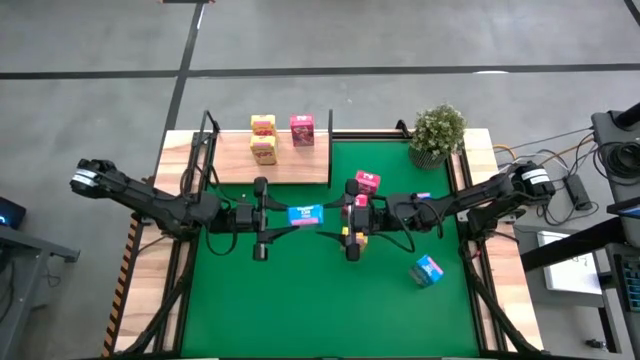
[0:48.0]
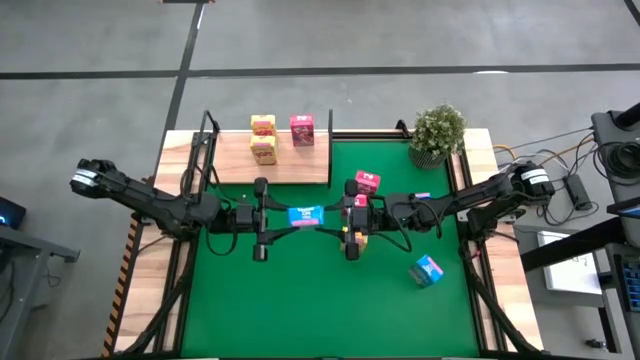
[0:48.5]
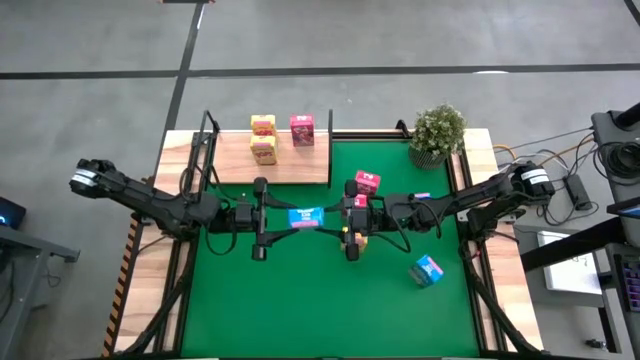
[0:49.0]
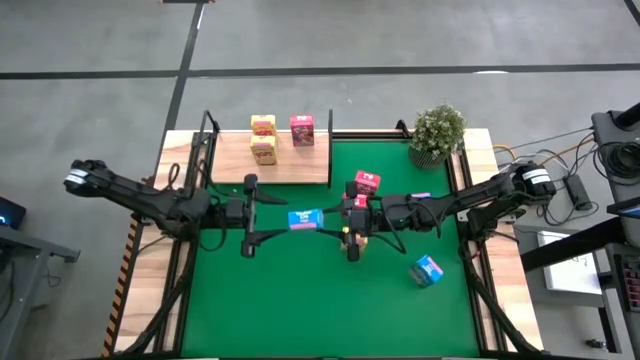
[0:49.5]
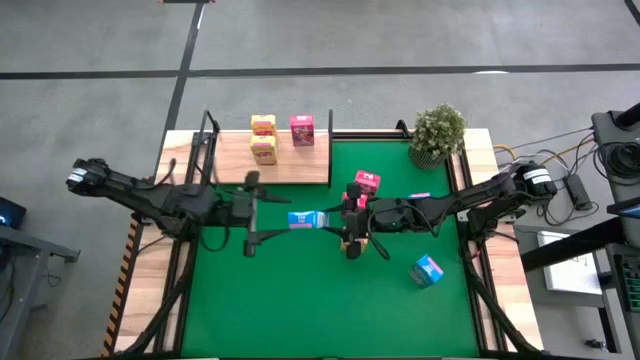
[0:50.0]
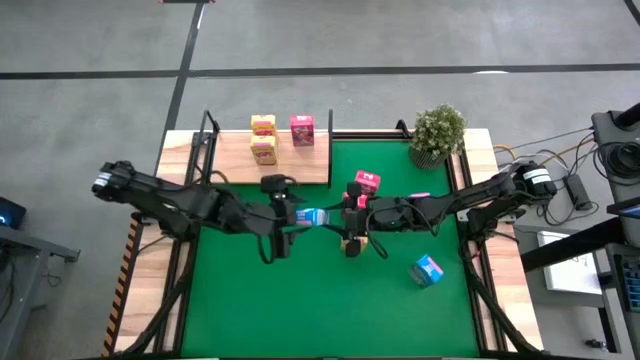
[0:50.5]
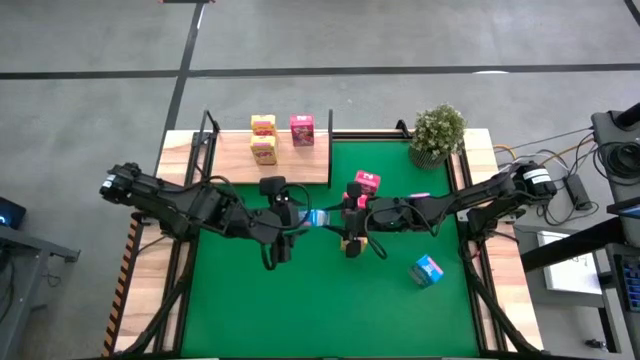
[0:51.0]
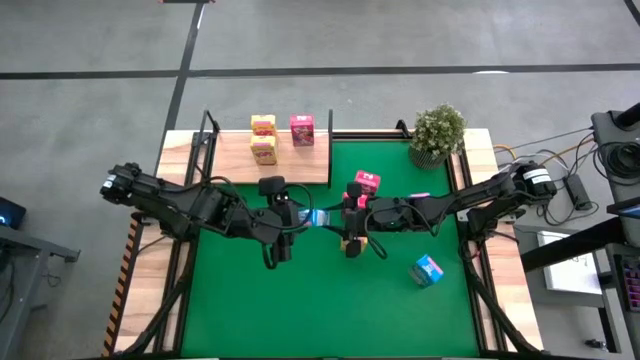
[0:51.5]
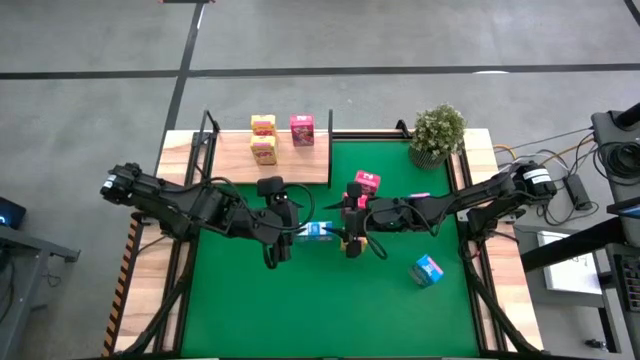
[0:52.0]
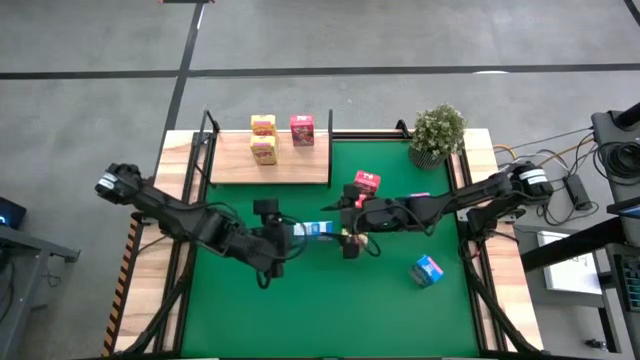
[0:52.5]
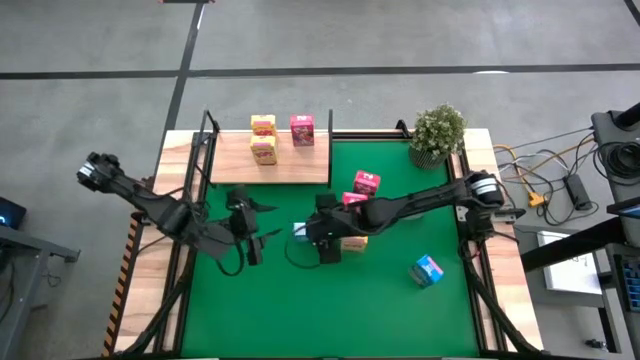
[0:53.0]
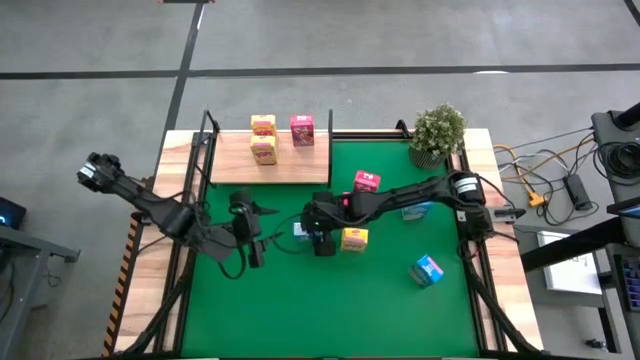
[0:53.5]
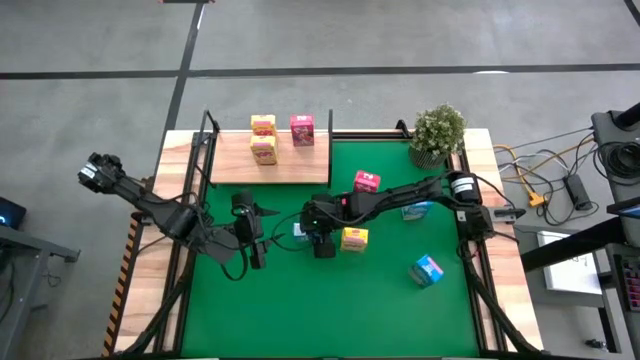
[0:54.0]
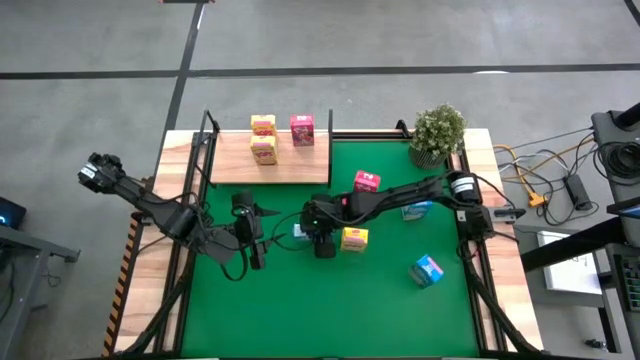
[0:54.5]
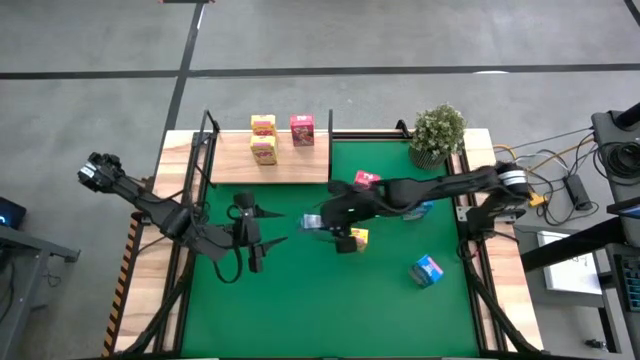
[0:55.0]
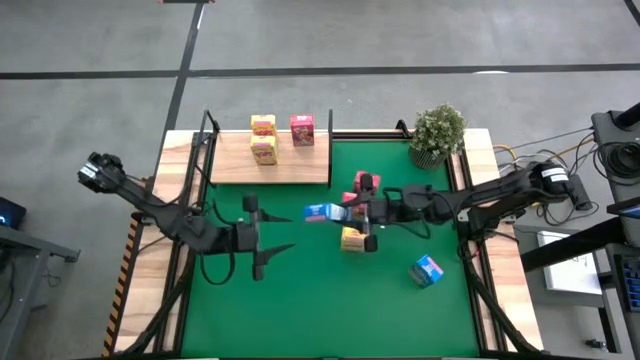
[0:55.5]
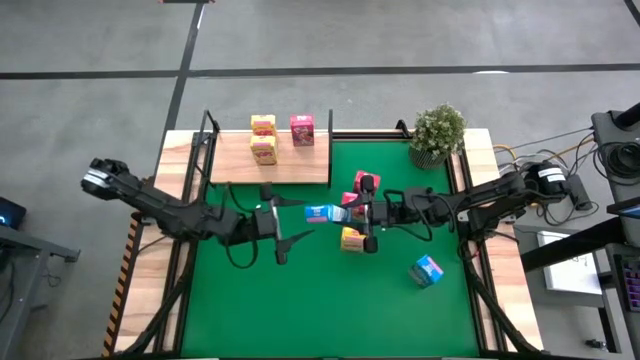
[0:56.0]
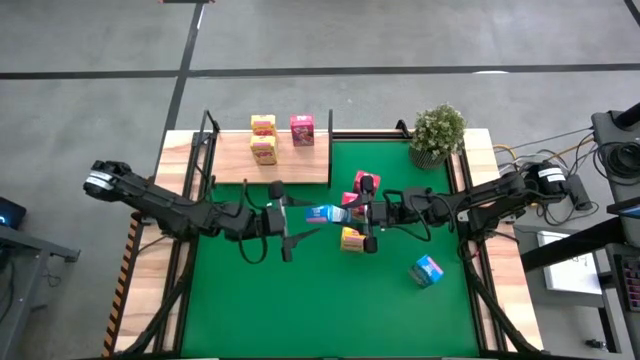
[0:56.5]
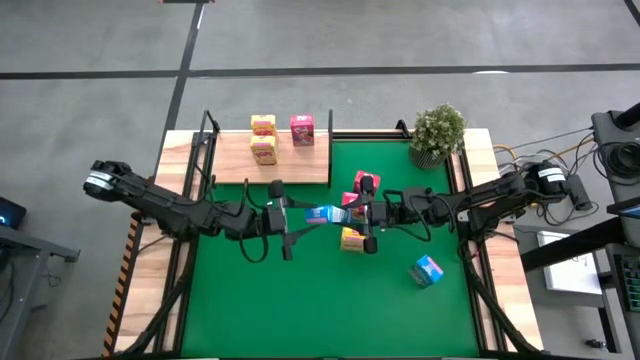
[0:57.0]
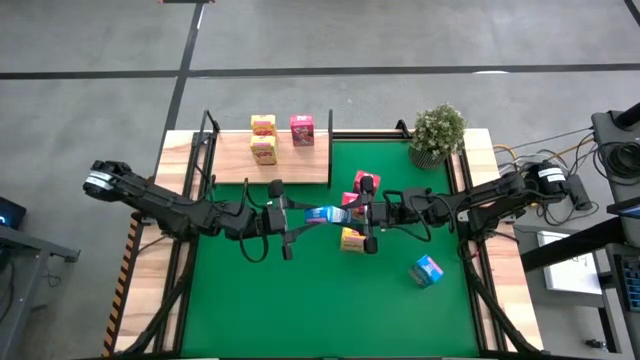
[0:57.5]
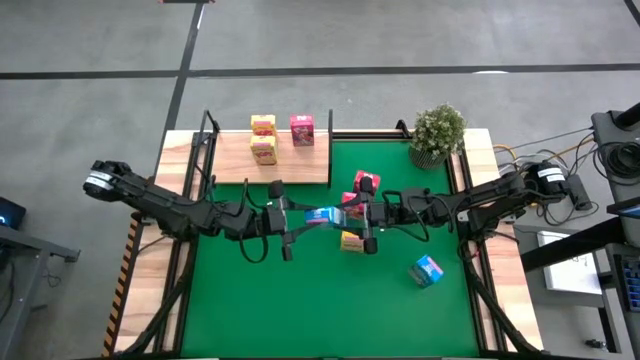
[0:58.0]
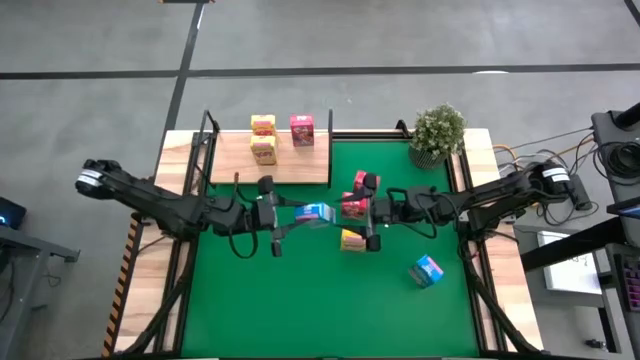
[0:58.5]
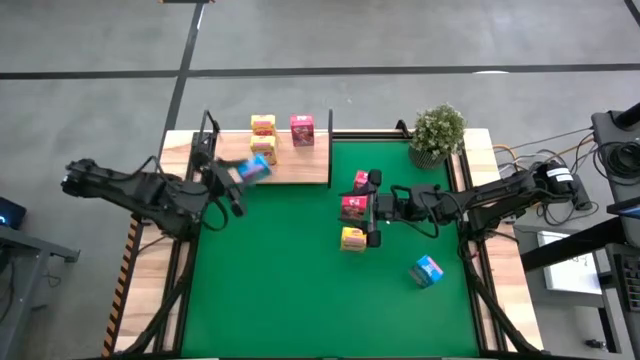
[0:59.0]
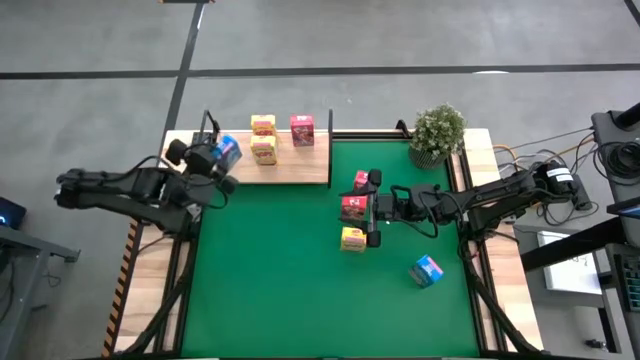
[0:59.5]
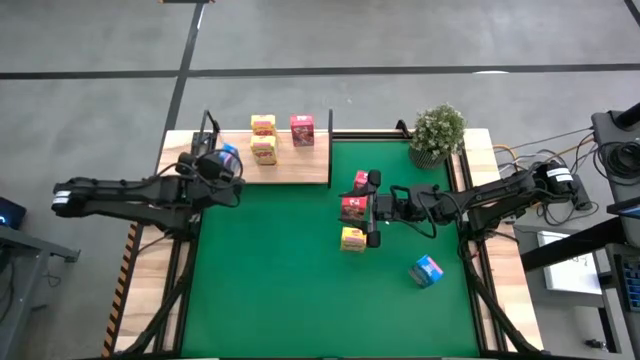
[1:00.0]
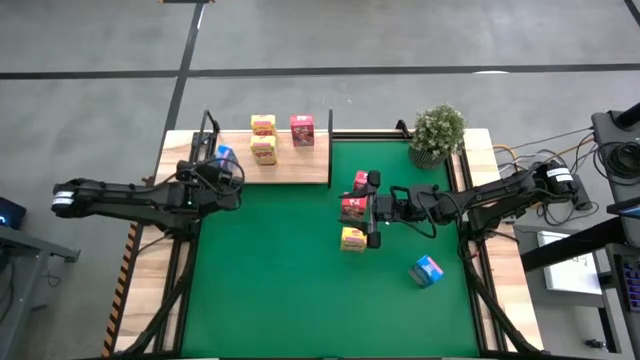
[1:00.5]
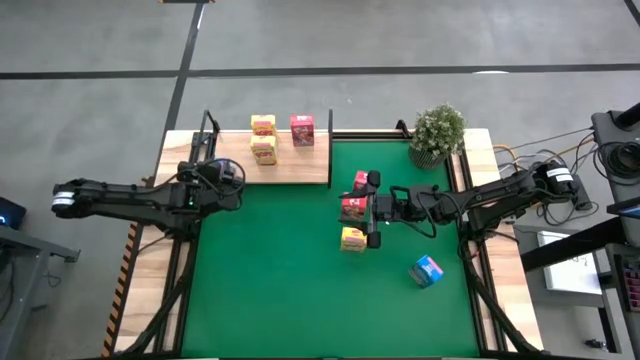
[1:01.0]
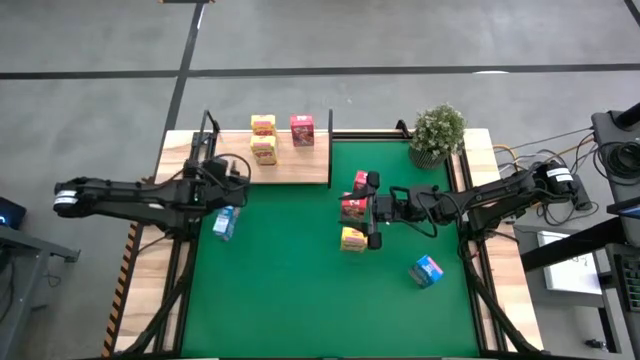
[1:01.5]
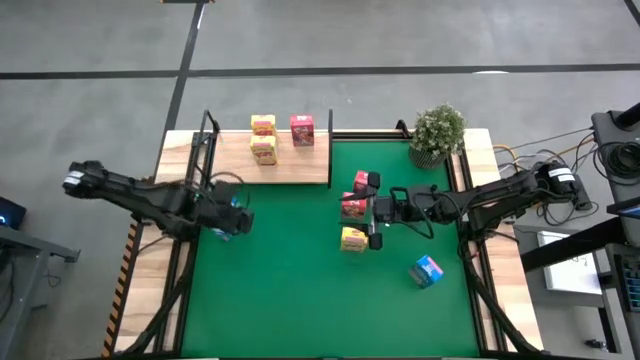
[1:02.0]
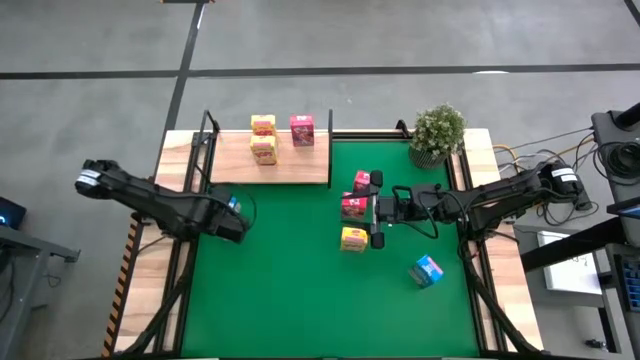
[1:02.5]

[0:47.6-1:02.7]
Task: Stack cereal on shelf
Put the middle blue cereal box on the shelf

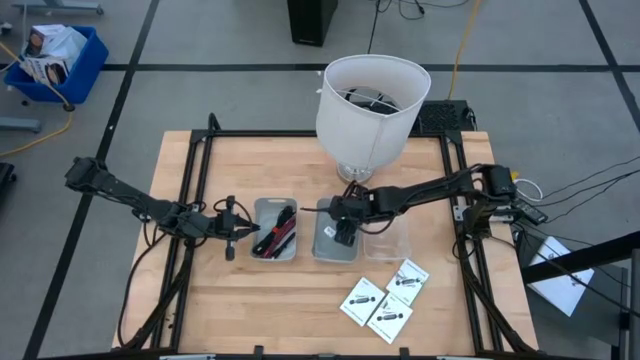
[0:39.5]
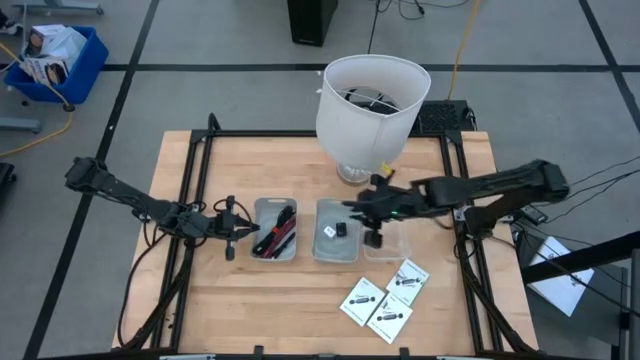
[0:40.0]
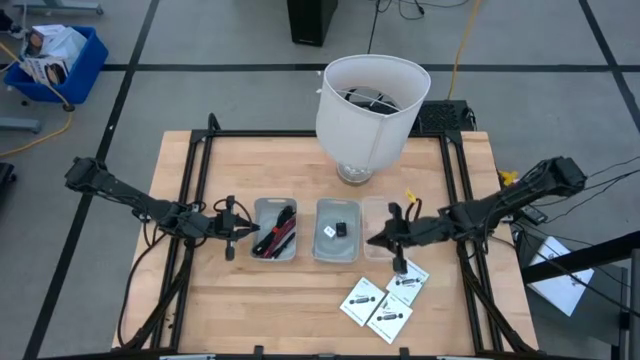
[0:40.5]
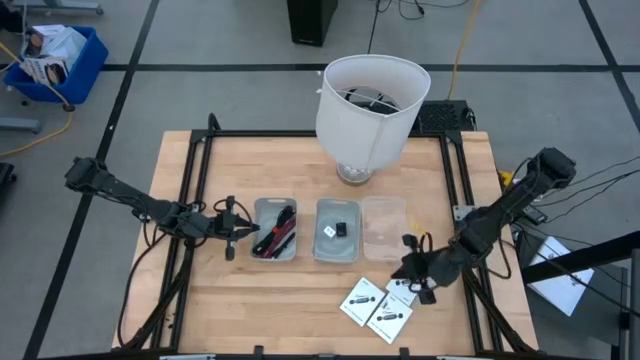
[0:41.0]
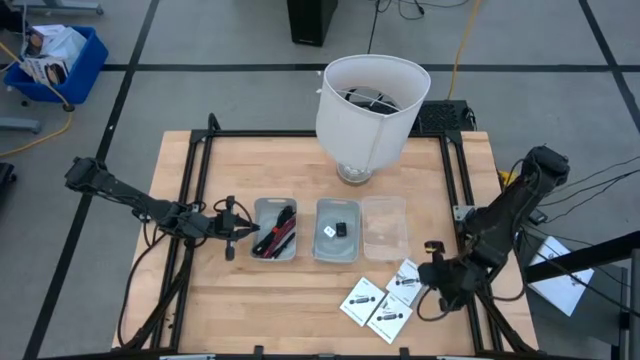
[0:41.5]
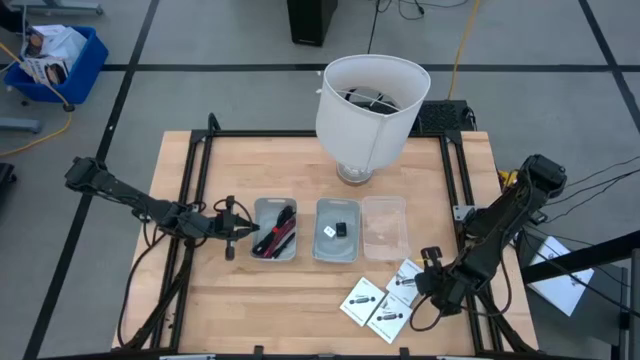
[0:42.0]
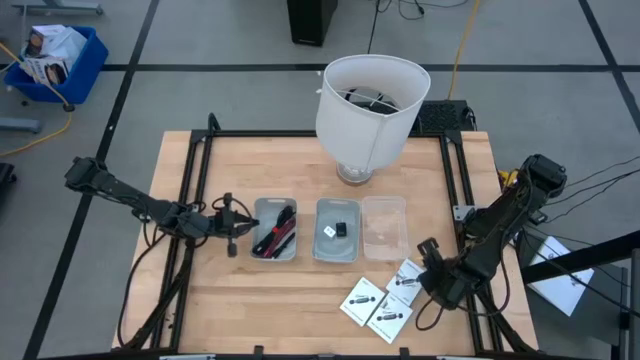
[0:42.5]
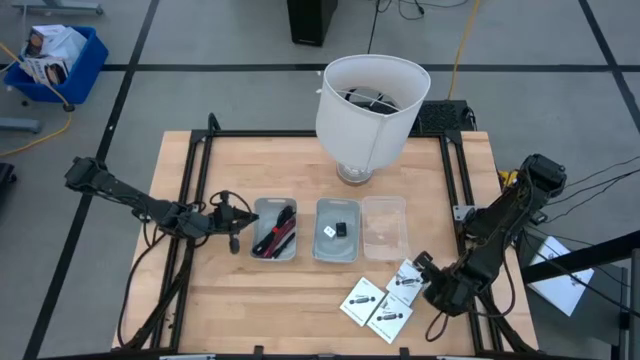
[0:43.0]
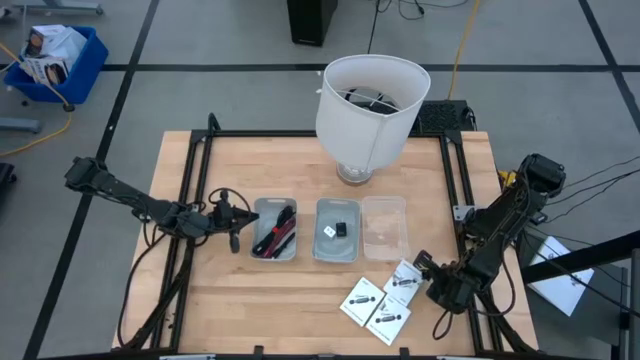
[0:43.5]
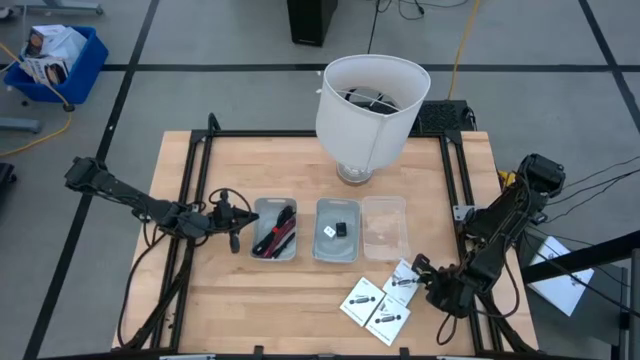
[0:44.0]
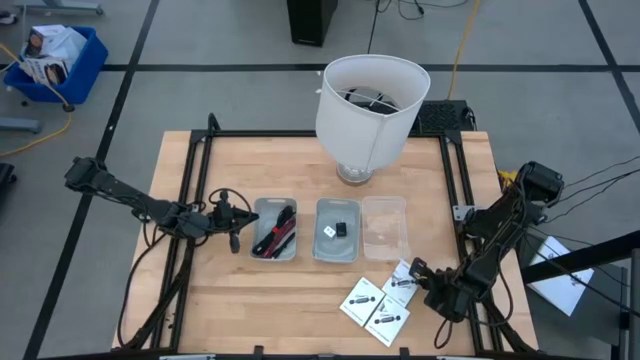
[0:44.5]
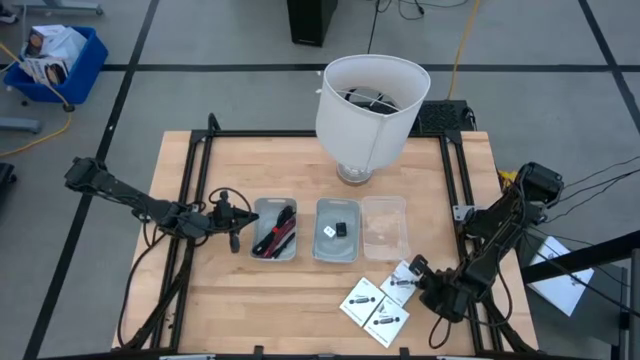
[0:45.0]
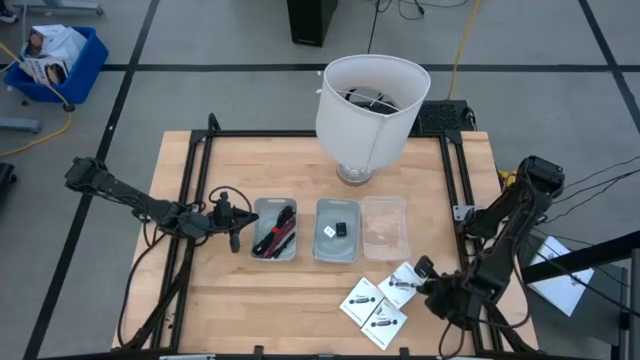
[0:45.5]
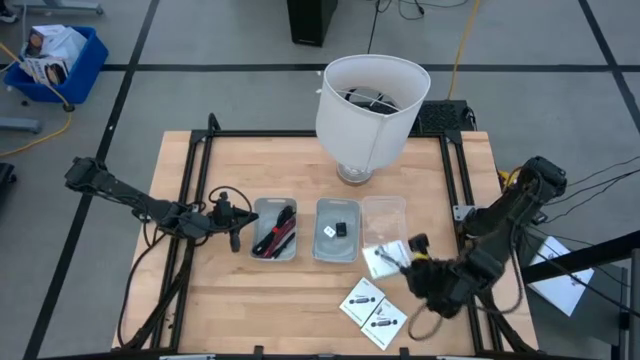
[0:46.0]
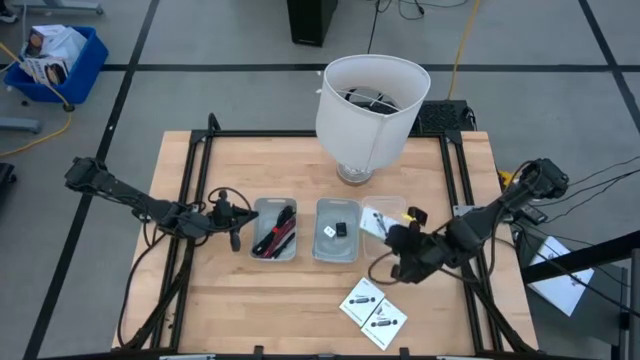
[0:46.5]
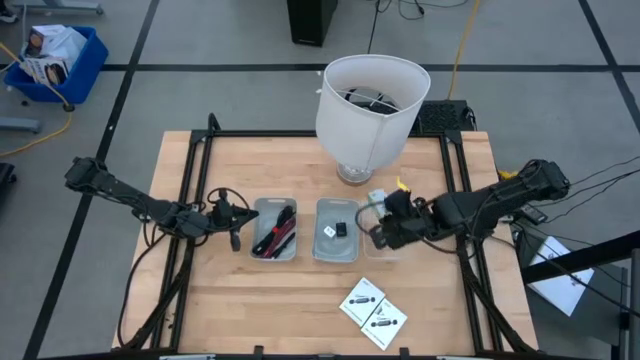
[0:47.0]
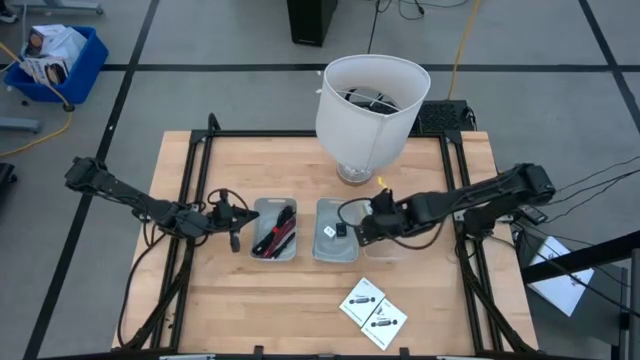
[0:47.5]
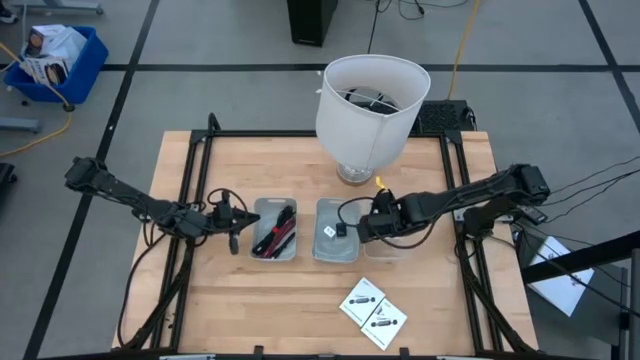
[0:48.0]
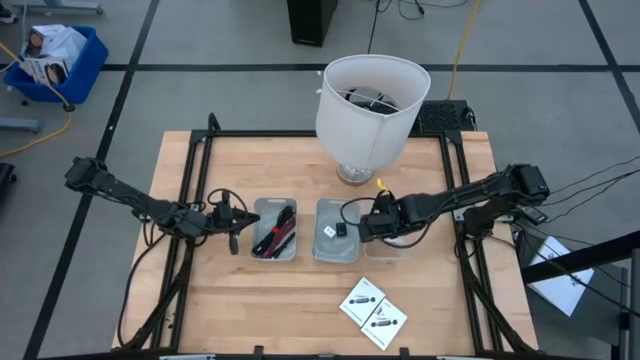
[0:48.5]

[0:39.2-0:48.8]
Task: Pick and place items into bin
Put the top white card reader box into the transparent bin
